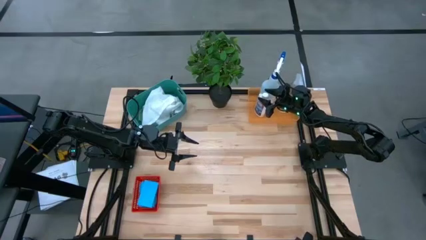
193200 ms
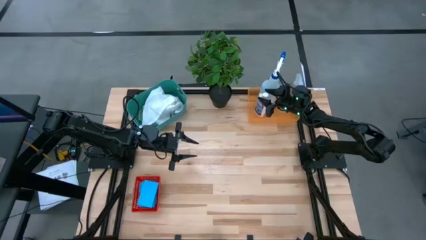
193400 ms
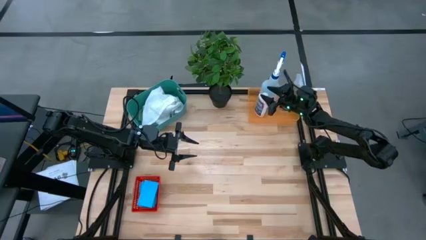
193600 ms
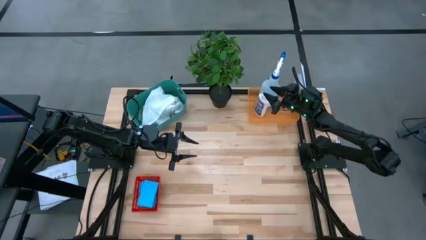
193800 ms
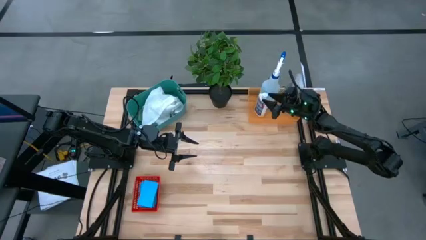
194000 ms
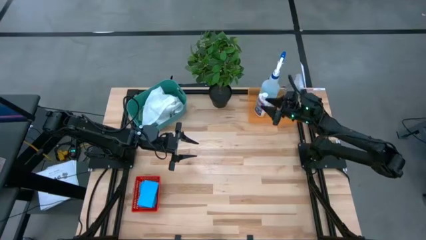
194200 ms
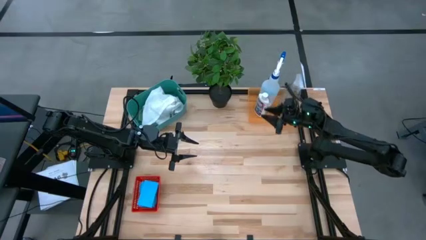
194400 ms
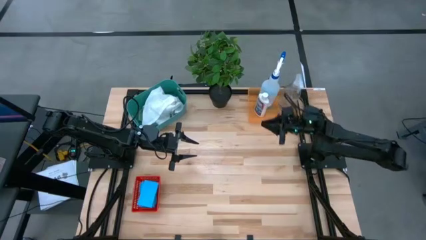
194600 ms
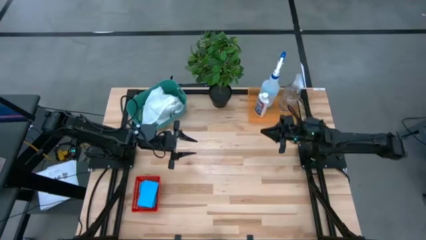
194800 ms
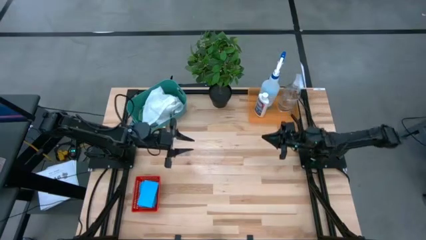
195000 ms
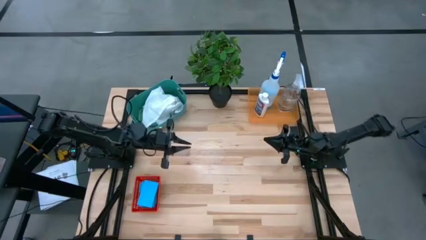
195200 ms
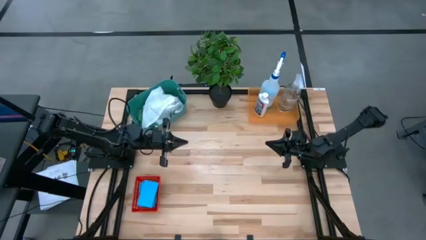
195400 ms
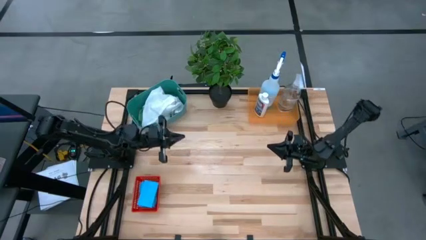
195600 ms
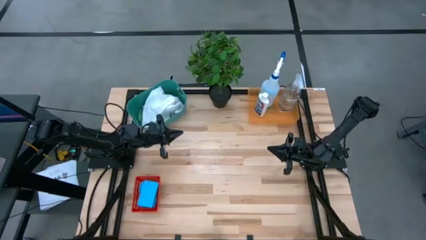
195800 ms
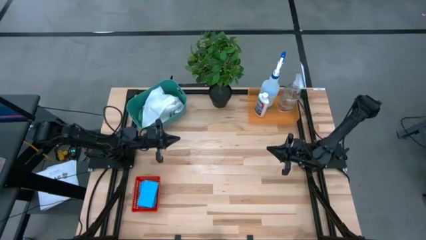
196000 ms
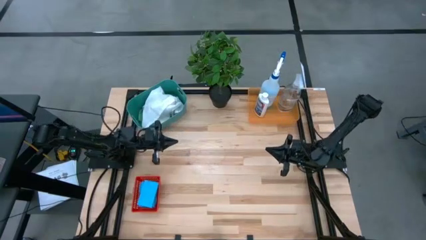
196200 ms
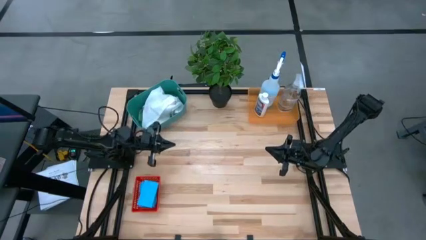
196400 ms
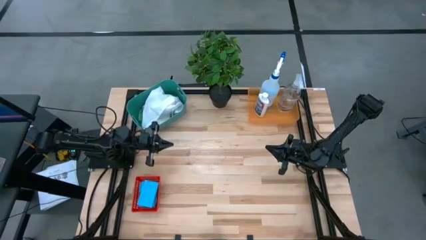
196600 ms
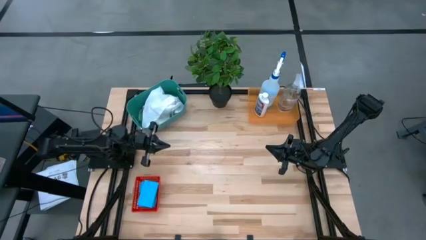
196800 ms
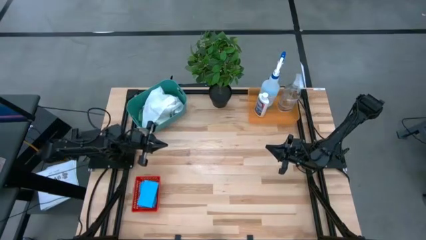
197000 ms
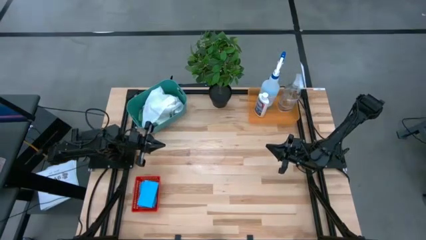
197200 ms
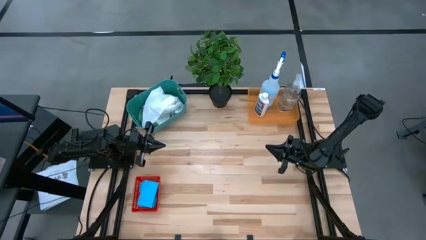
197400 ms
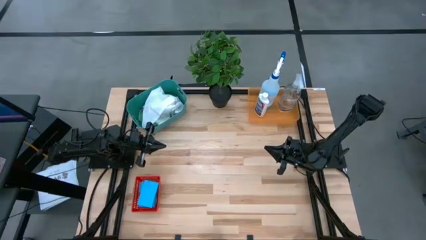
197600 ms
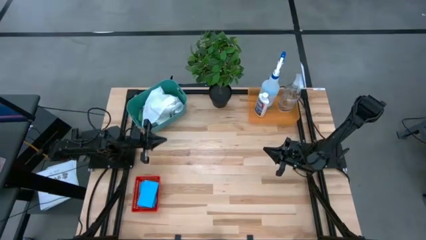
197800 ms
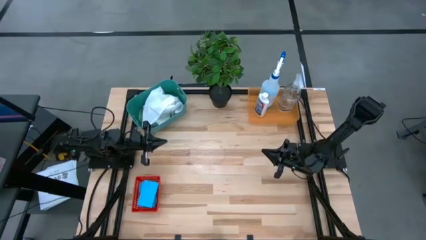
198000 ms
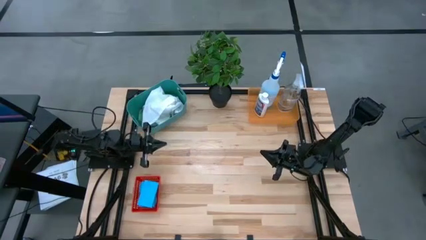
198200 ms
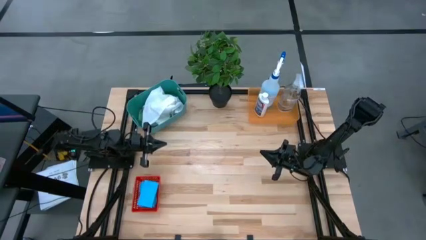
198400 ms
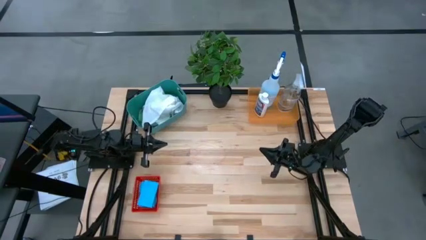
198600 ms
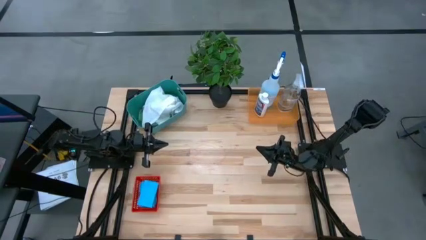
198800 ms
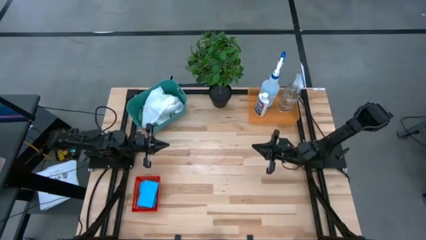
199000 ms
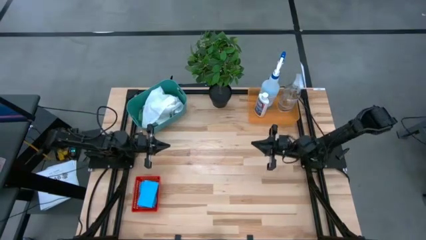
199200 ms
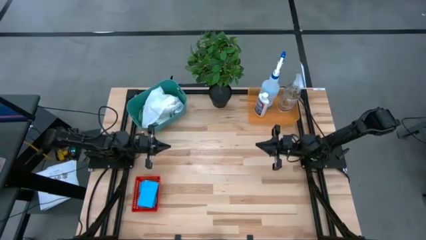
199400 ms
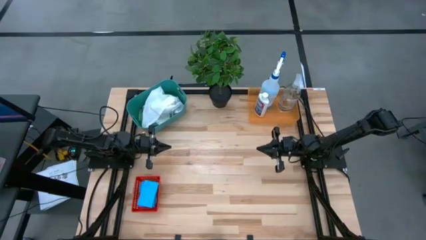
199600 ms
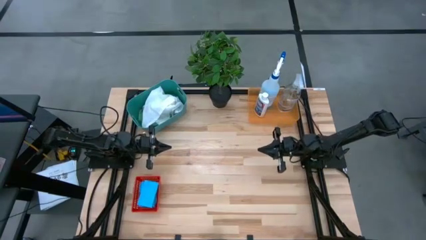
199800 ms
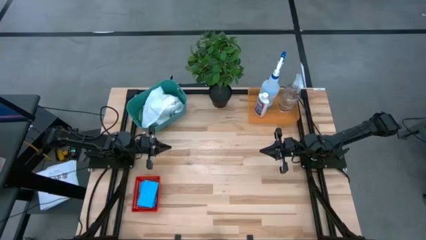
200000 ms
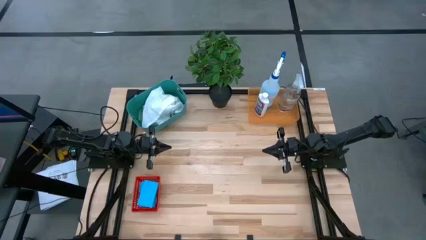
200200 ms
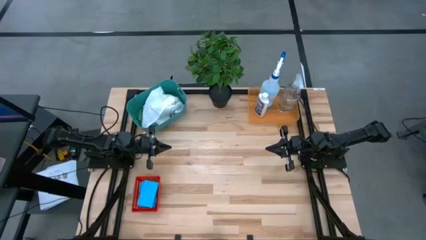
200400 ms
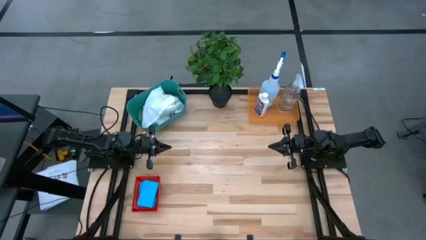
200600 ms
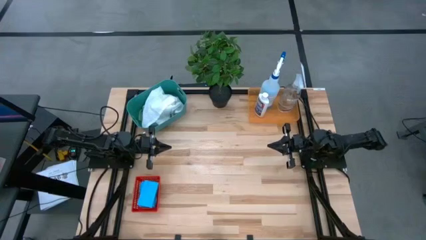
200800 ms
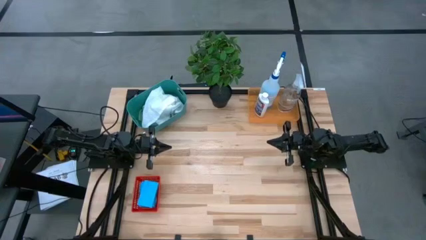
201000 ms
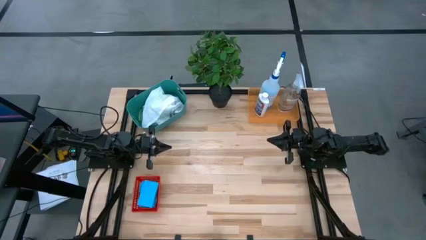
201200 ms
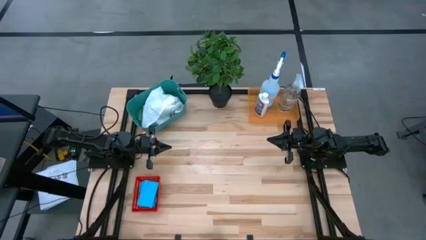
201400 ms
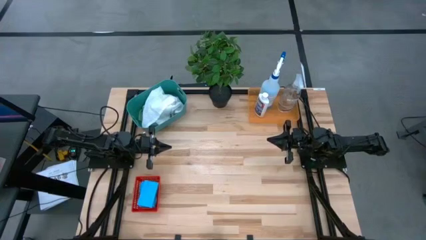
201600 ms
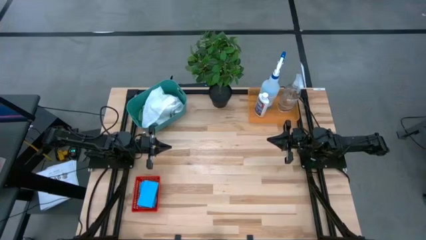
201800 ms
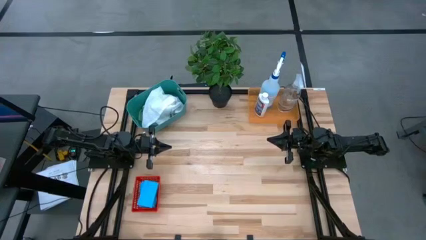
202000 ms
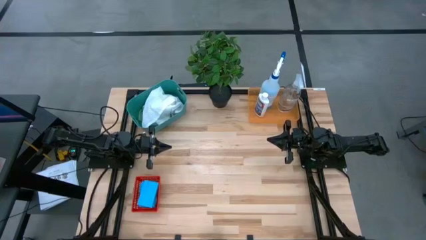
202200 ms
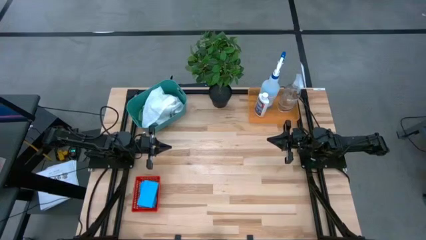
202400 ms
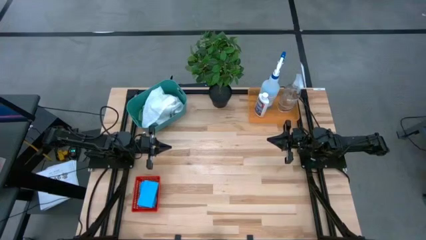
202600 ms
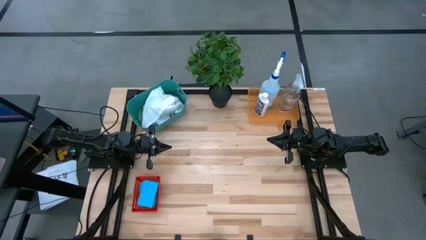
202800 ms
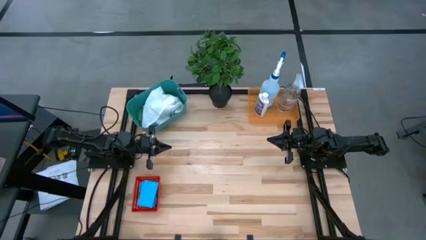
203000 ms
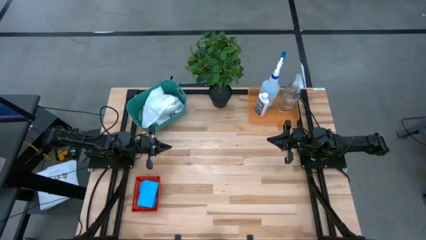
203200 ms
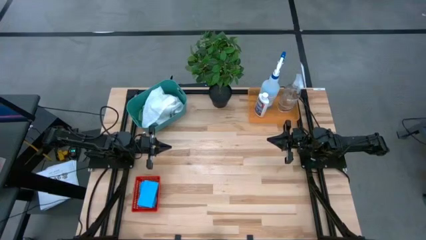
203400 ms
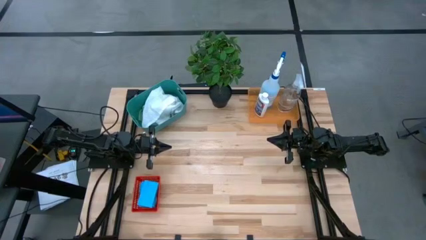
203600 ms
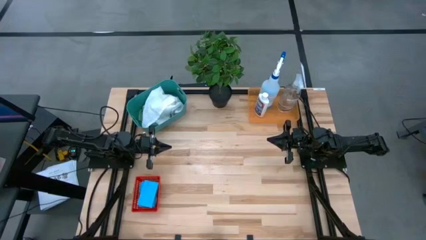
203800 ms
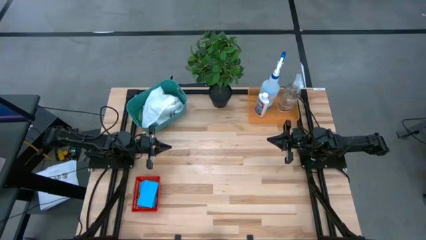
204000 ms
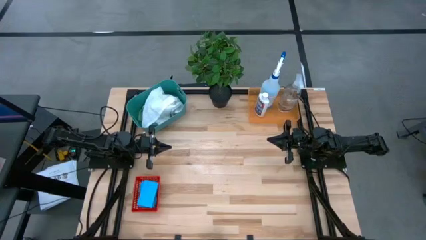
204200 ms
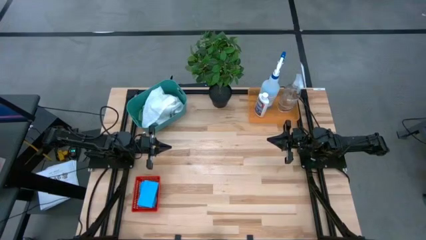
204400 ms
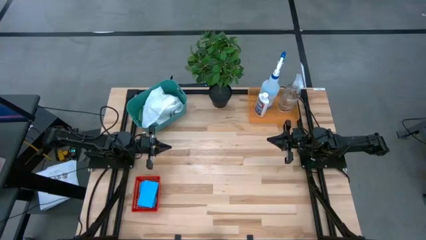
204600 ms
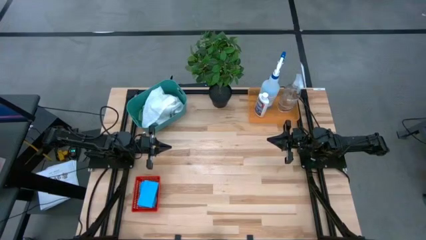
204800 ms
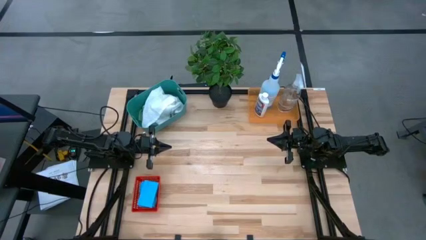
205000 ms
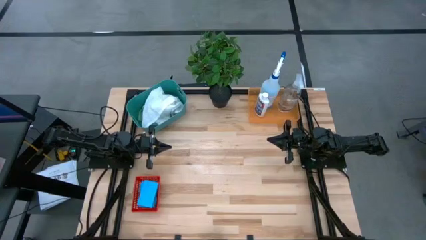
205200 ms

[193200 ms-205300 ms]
Task: Pick & Place Kitchen Items
Return to Home Position

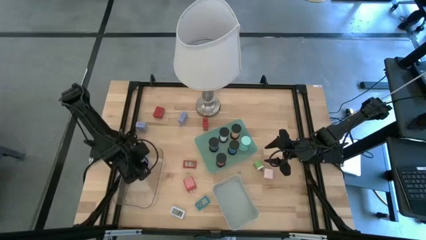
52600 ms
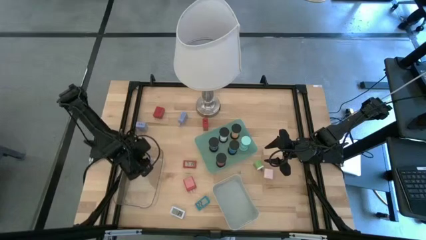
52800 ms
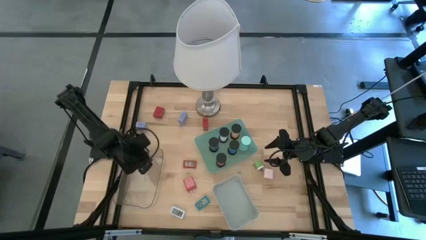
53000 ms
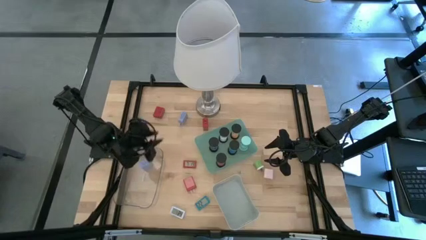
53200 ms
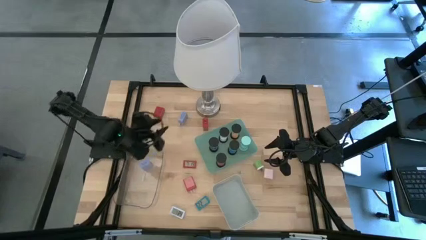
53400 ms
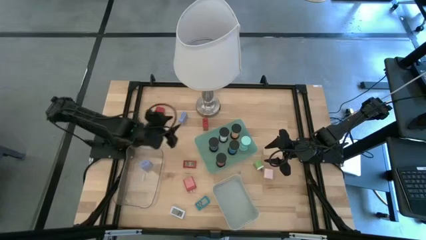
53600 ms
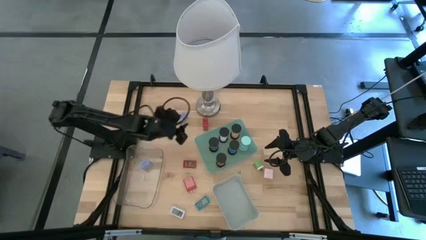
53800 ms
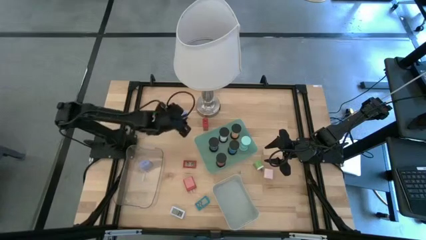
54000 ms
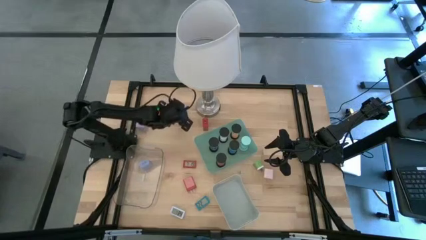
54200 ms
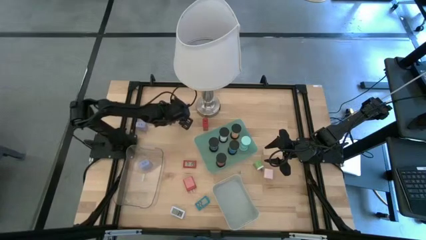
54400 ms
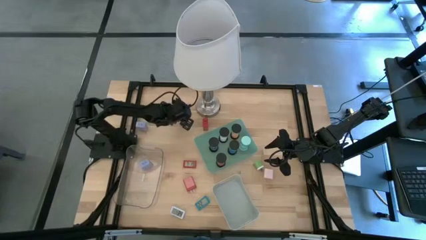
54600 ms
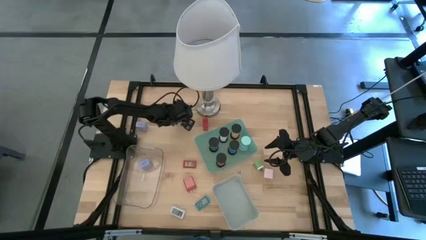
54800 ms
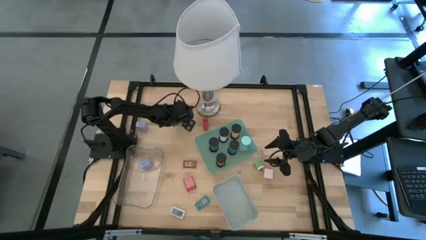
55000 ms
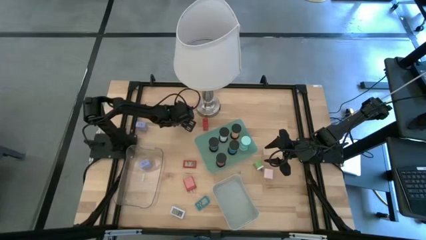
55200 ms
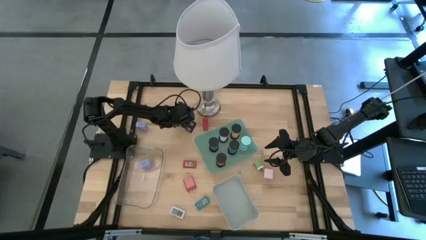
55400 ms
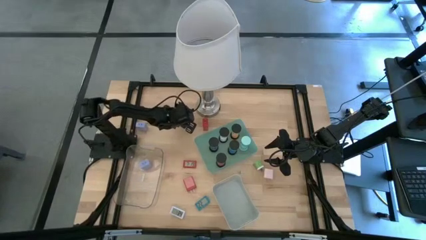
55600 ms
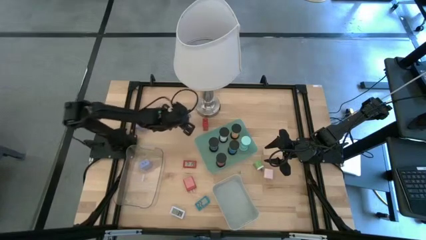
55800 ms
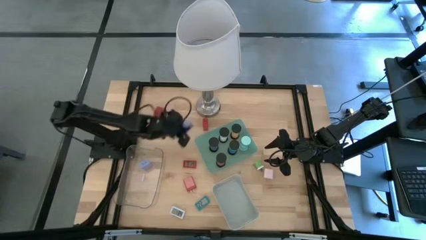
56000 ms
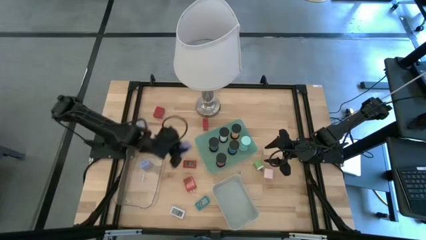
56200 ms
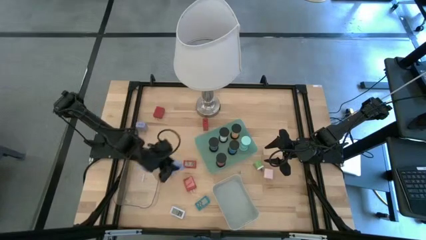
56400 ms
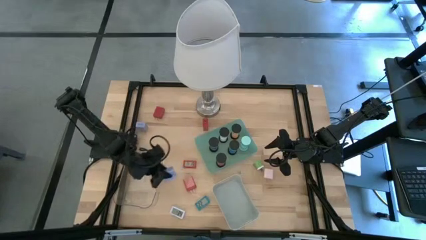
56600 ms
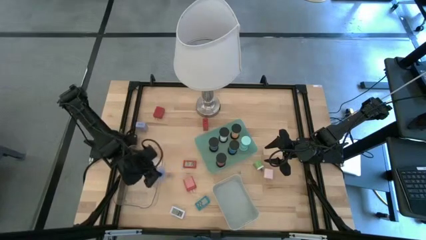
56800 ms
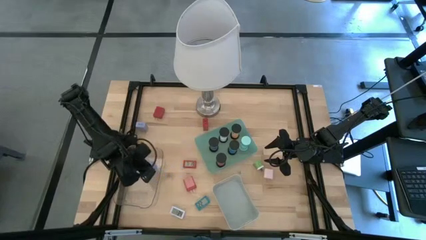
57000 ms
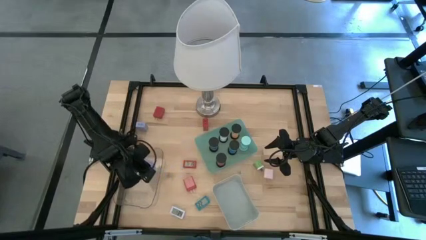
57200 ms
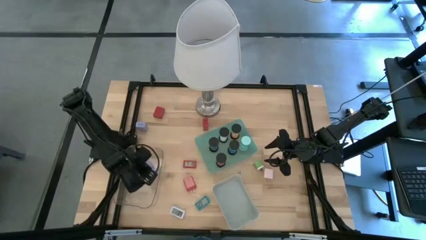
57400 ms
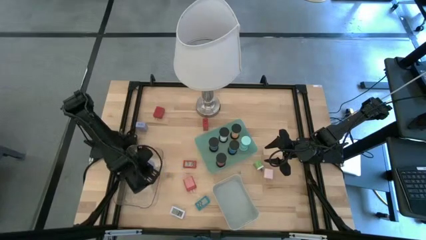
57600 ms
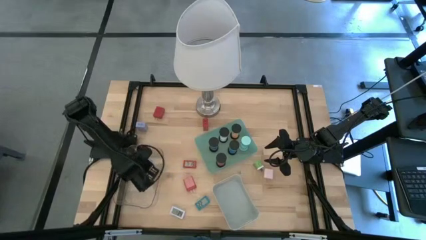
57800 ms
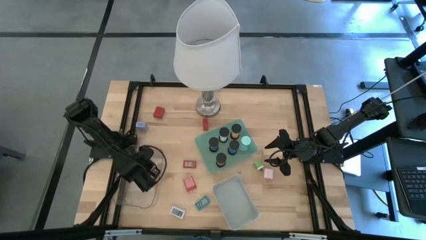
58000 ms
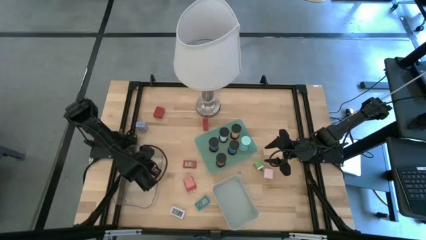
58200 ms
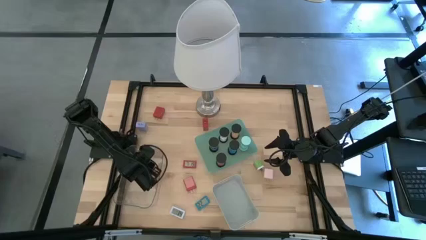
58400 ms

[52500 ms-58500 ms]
Task: Pick & Place Office items
Put the top blue charger adapter into the transparent bin
